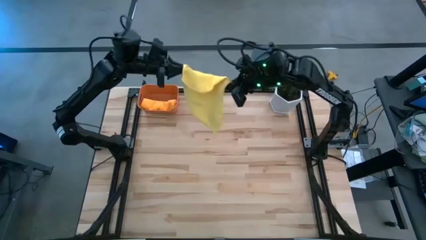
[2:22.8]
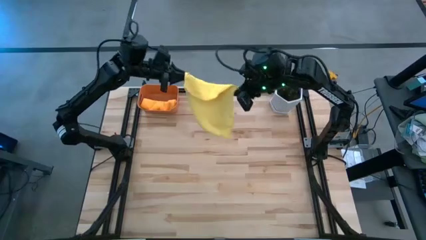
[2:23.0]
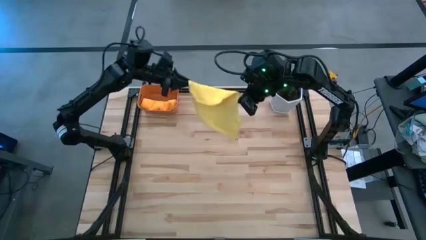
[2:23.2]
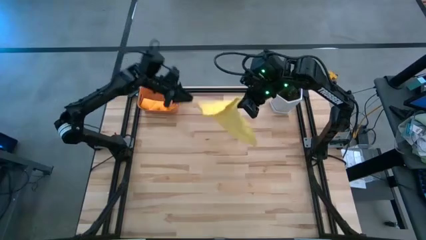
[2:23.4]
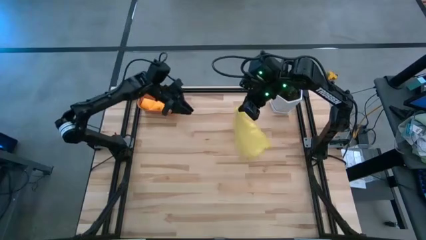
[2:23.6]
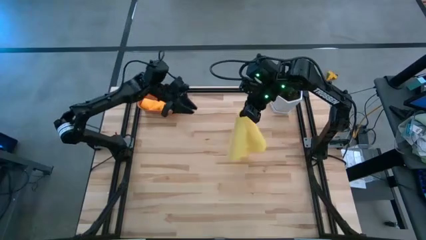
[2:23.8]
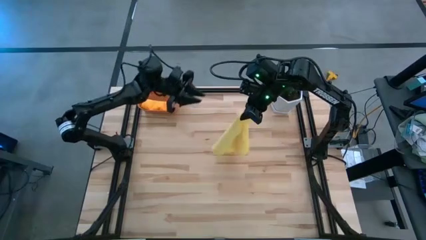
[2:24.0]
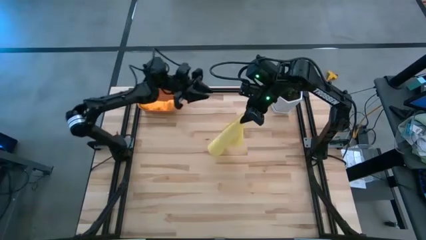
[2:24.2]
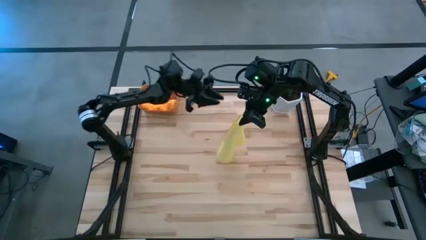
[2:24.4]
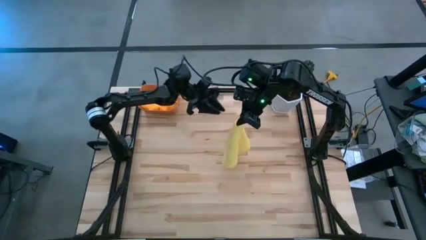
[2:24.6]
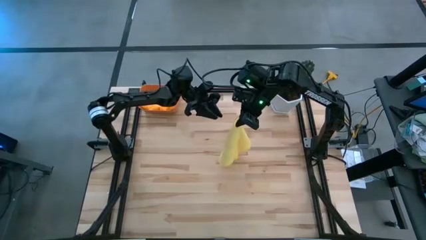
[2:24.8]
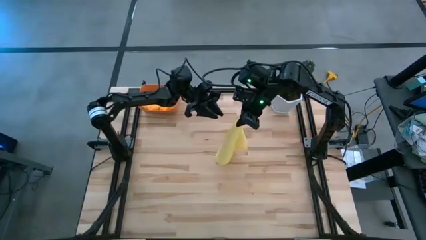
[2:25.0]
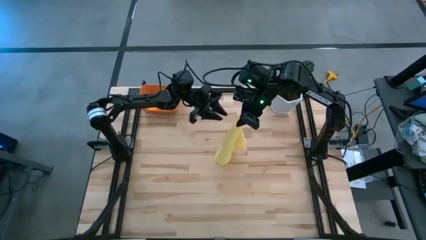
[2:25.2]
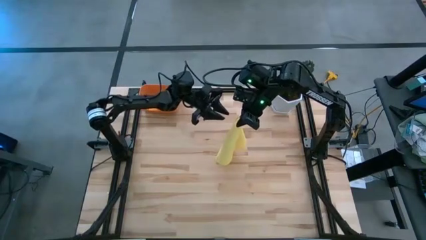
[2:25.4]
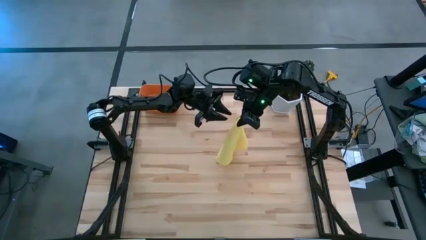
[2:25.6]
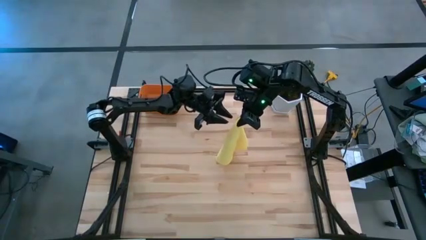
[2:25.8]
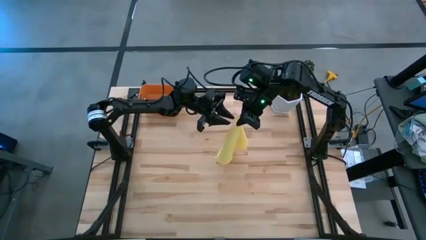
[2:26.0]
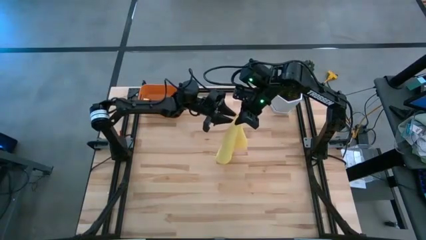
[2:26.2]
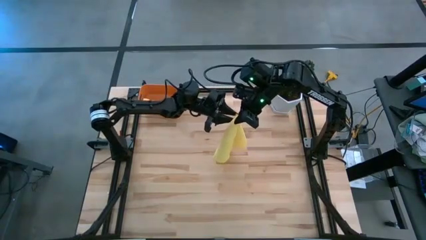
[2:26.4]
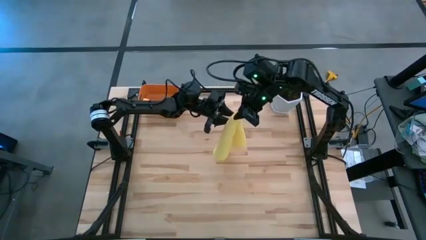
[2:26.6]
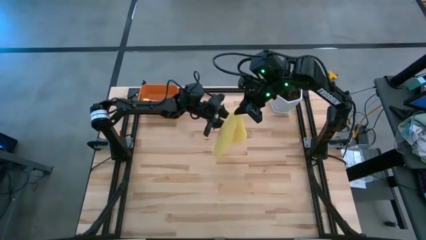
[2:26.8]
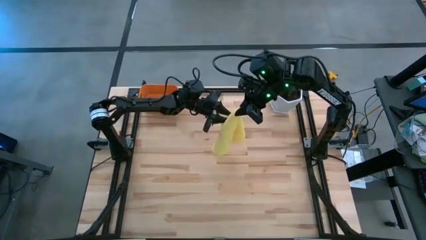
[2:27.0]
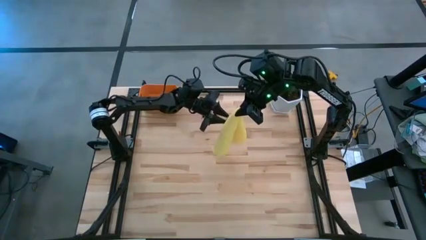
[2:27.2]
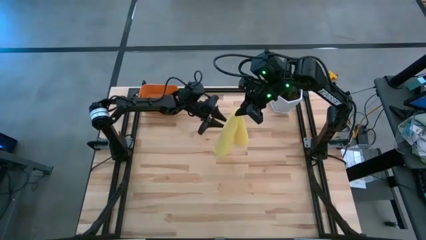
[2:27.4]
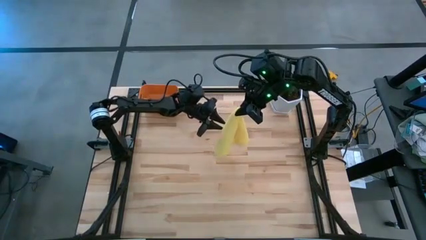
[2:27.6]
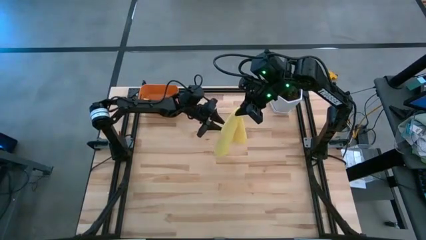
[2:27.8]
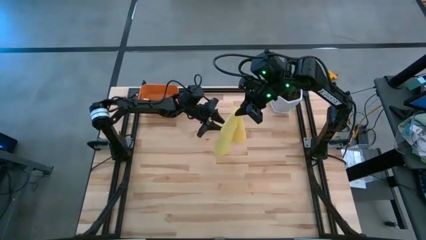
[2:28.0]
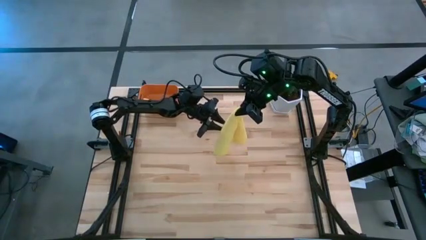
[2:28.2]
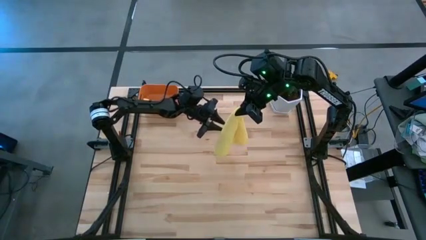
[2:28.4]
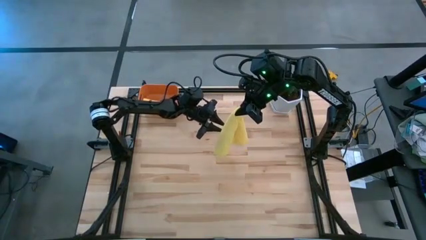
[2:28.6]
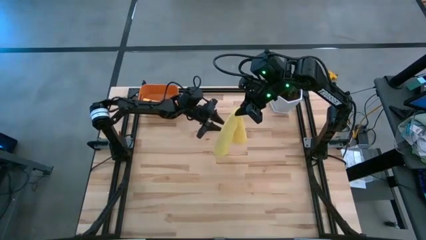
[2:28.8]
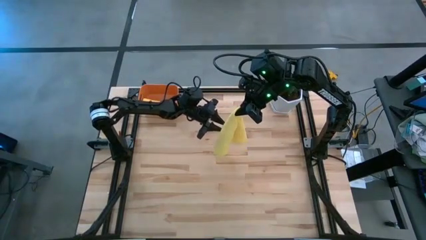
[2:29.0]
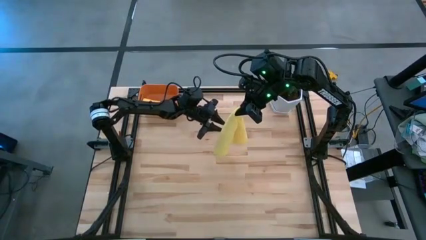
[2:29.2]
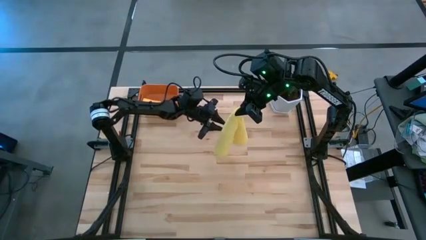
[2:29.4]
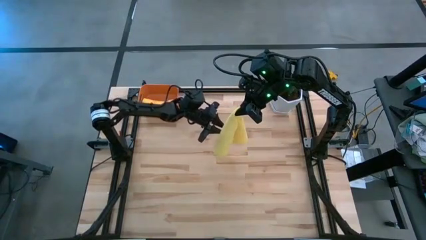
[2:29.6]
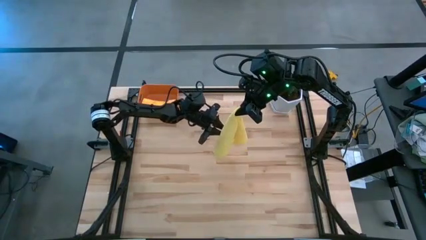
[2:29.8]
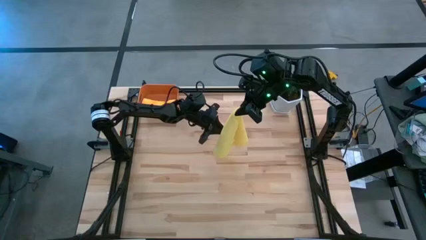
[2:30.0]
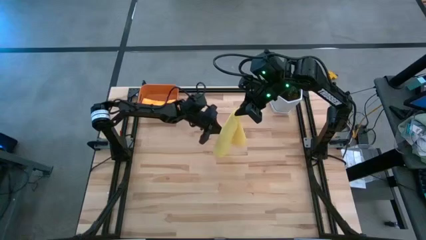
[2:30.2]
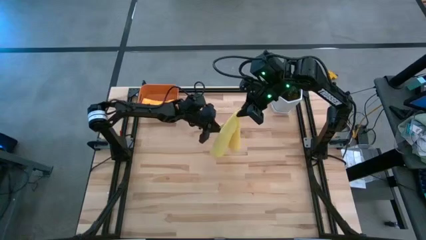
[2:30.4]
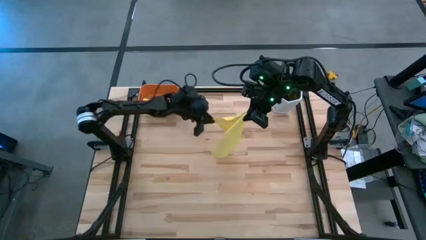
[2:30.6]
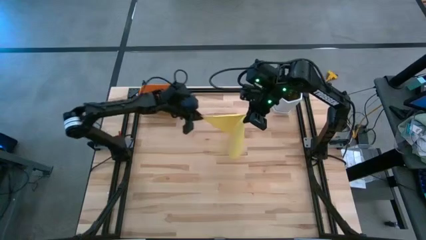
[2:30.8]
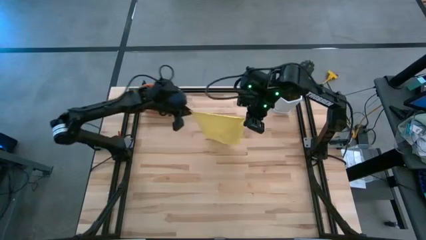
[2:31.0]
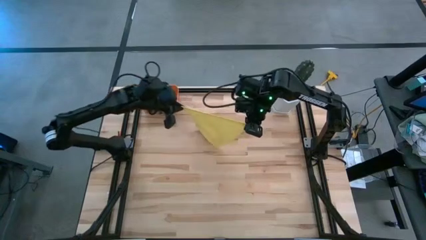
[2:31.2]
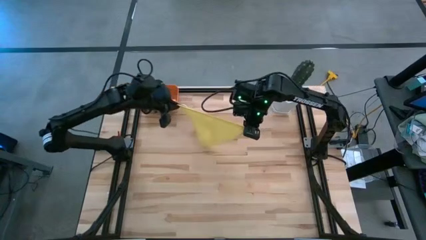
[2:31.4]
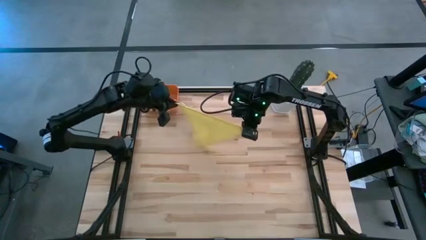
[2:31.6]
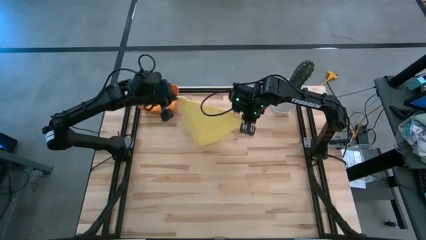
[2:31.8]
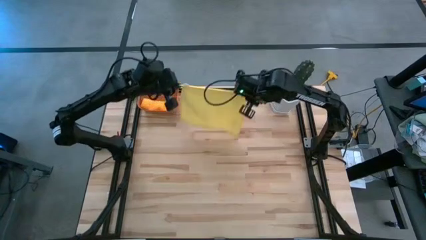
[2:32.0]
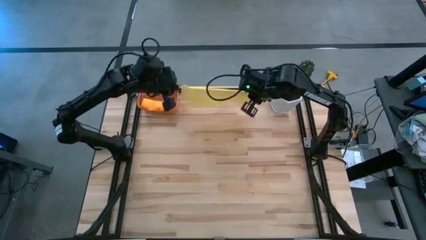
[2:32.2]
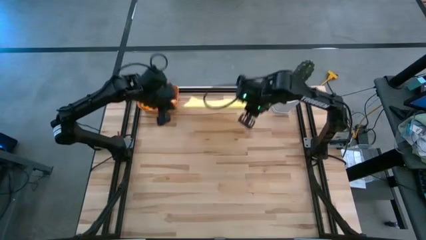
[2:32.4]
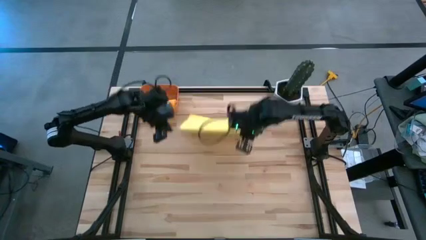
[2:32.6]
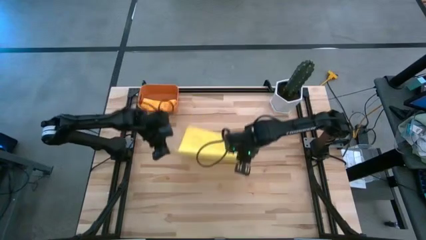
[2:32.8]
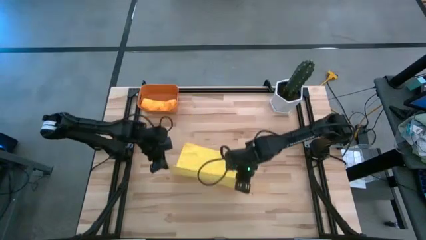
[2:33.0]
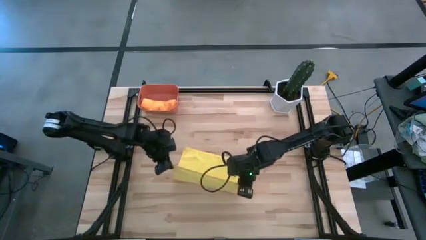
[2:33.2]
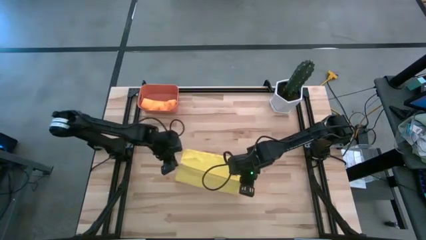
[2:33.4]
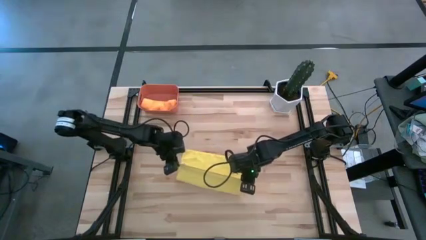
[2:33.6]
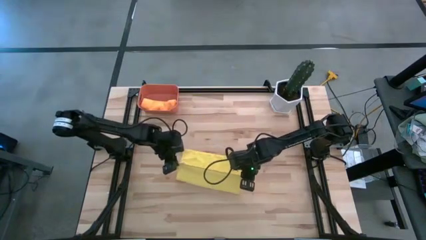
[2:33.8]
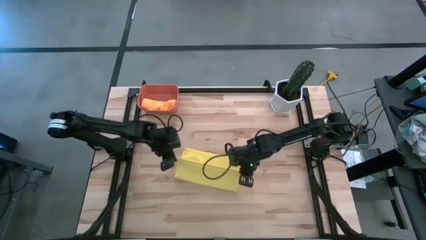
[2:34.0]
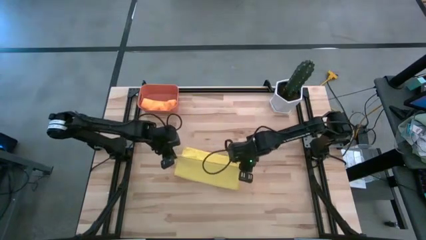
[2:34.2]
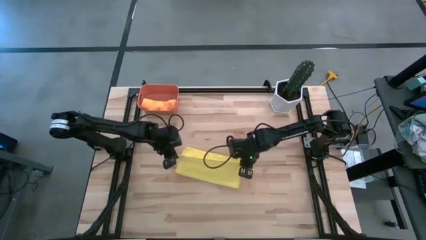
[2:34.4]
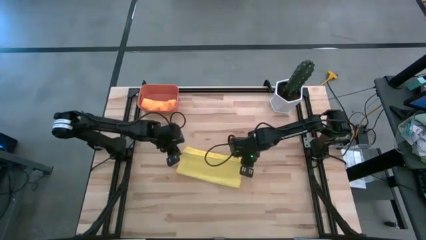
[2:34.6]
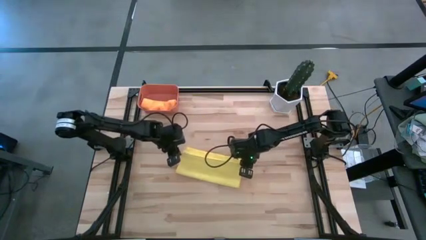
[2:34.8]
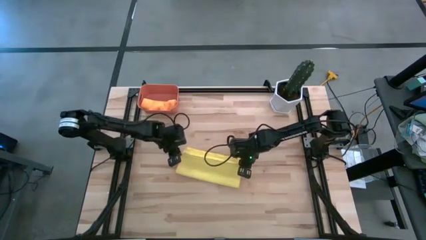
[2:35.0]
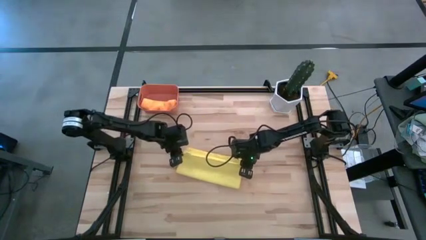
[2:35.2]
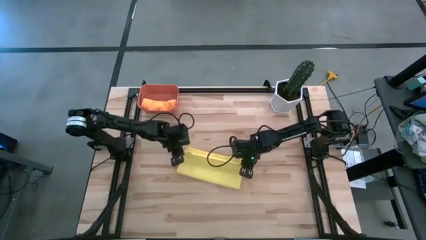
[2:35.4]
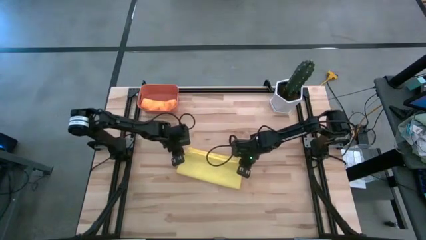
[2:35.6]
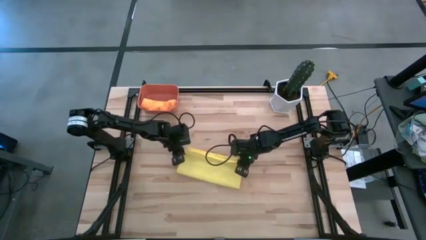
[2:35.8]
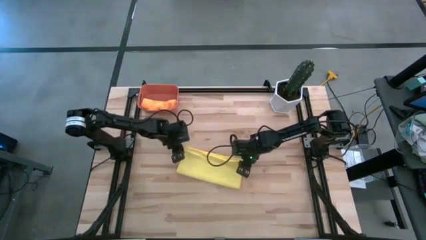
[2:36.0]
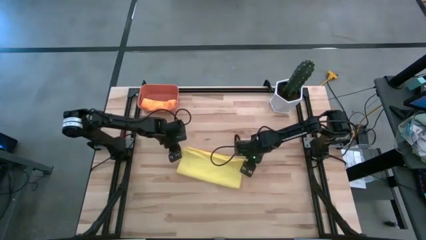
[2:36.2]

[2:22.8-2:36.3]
Task: Roll microfiber towels into tight, uniform cylinder then place into a basket
Fold the yellow towel
